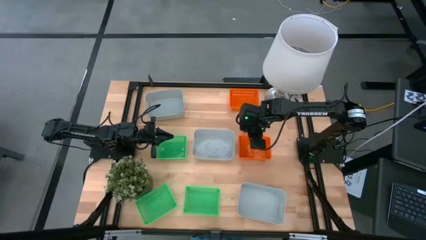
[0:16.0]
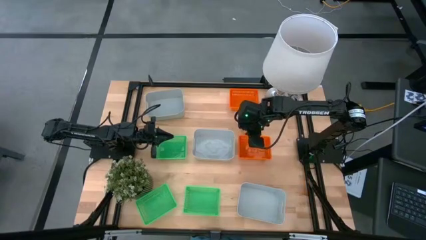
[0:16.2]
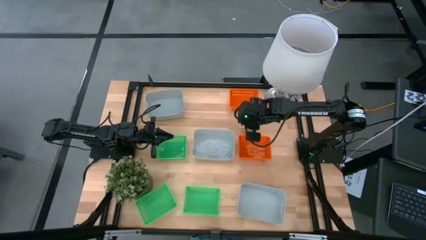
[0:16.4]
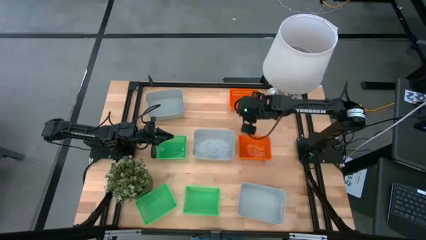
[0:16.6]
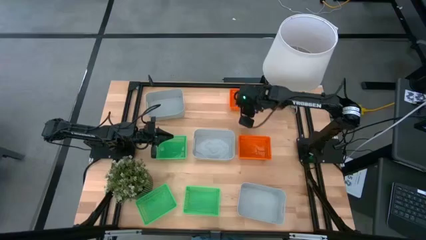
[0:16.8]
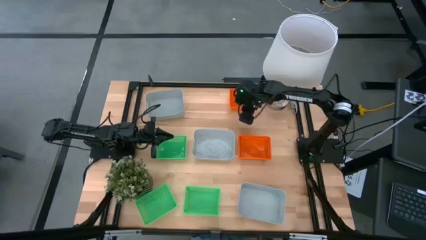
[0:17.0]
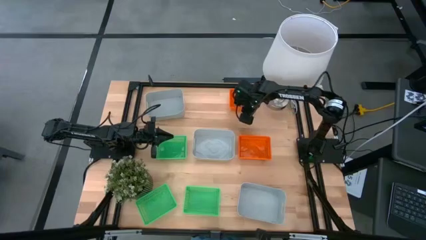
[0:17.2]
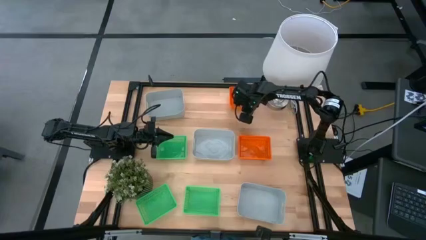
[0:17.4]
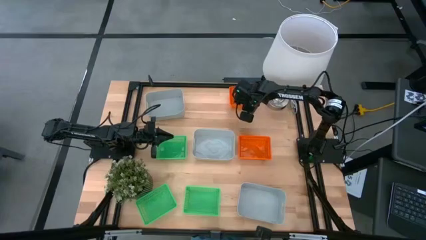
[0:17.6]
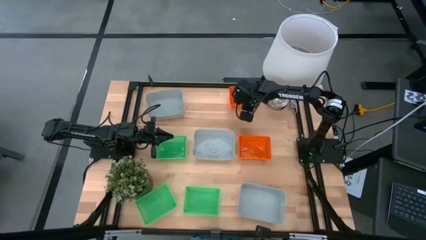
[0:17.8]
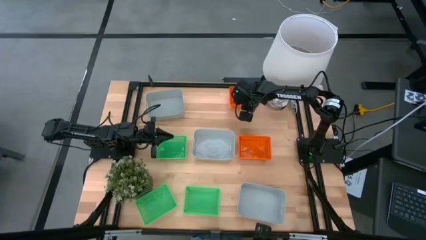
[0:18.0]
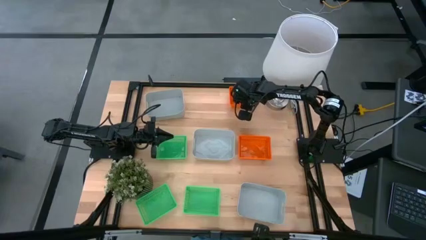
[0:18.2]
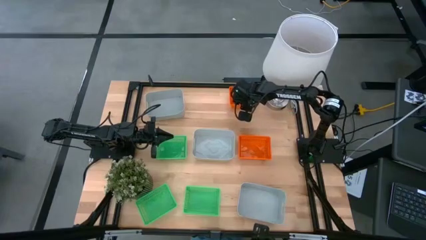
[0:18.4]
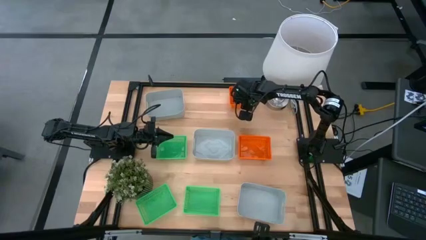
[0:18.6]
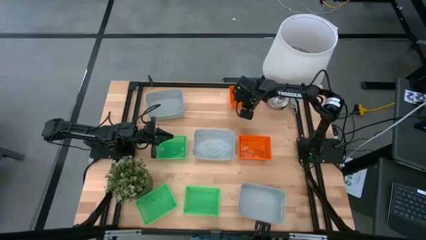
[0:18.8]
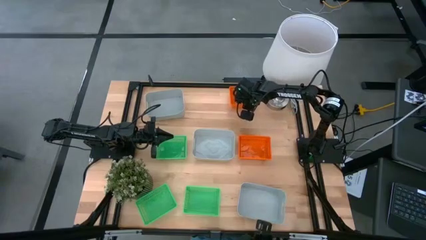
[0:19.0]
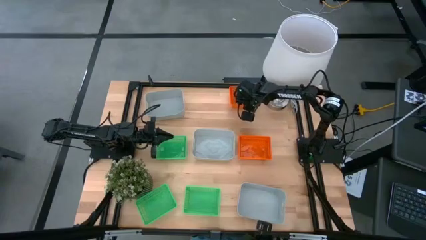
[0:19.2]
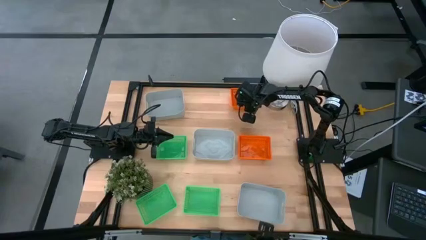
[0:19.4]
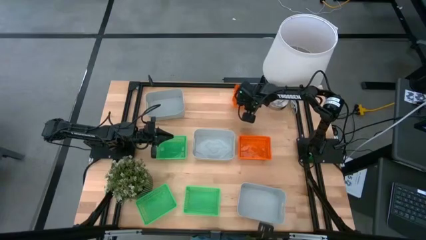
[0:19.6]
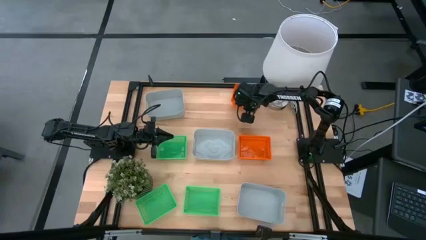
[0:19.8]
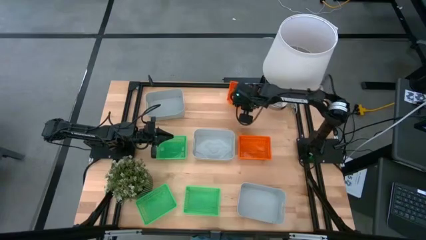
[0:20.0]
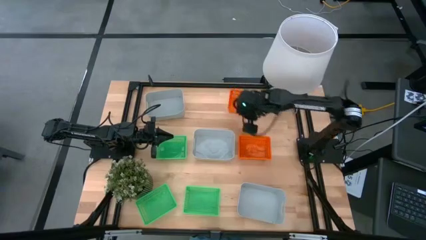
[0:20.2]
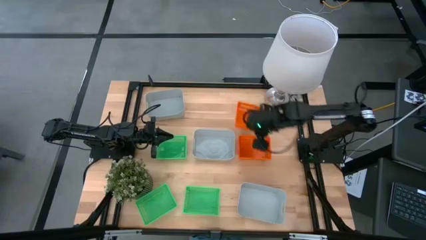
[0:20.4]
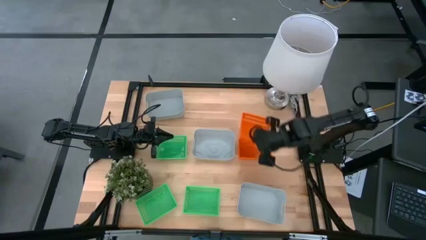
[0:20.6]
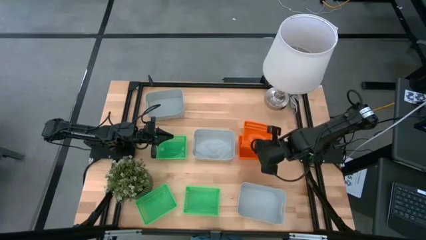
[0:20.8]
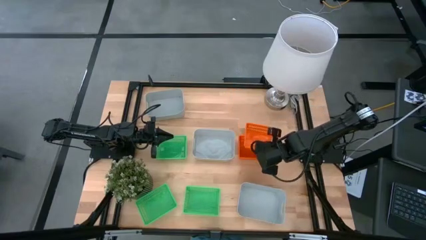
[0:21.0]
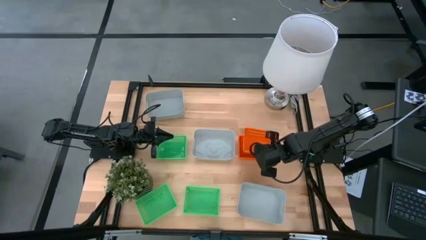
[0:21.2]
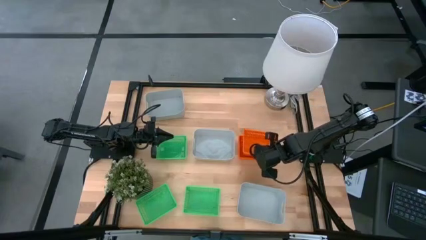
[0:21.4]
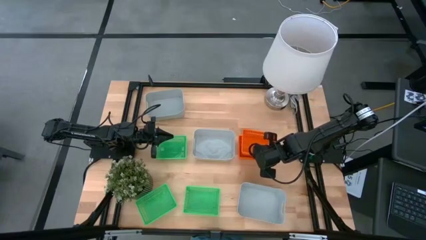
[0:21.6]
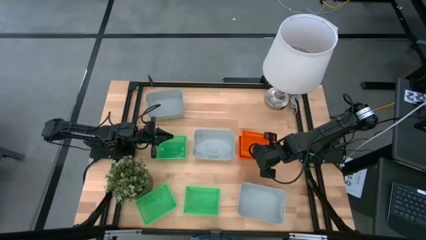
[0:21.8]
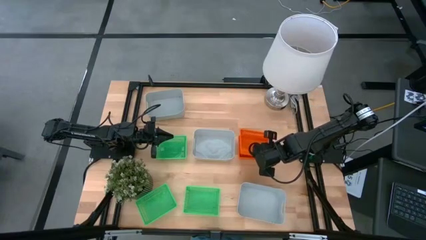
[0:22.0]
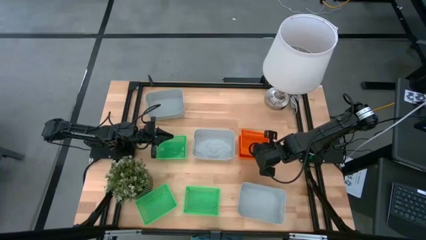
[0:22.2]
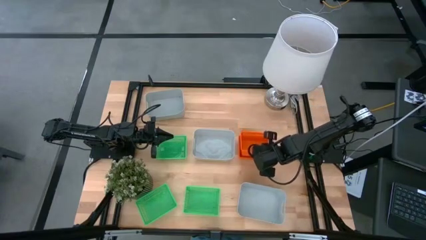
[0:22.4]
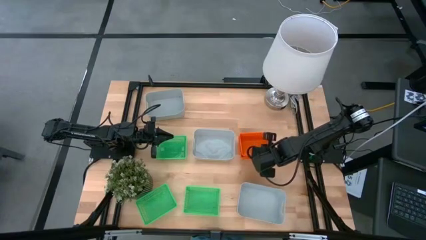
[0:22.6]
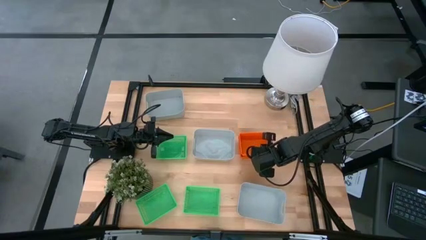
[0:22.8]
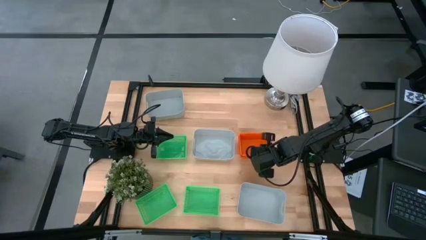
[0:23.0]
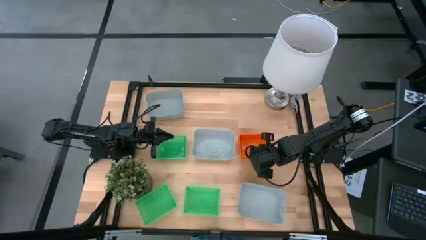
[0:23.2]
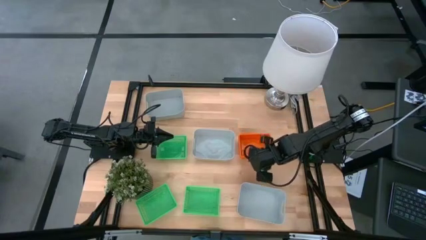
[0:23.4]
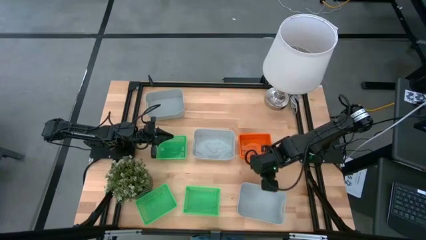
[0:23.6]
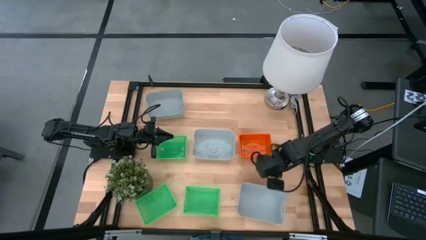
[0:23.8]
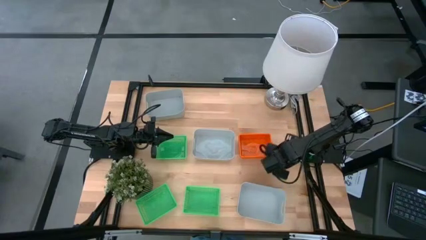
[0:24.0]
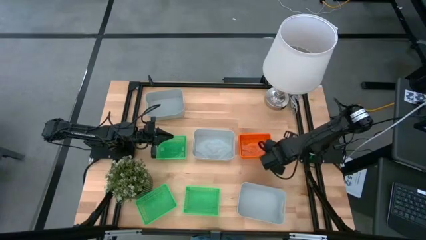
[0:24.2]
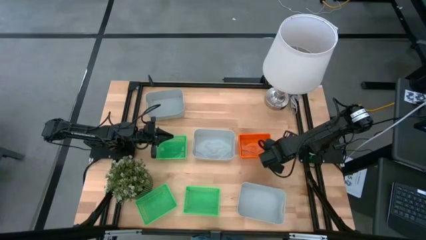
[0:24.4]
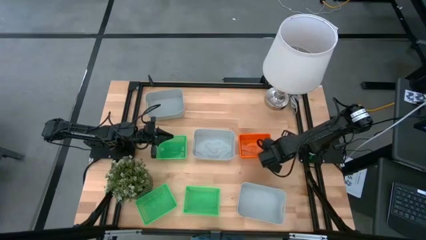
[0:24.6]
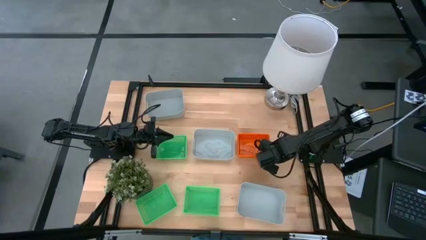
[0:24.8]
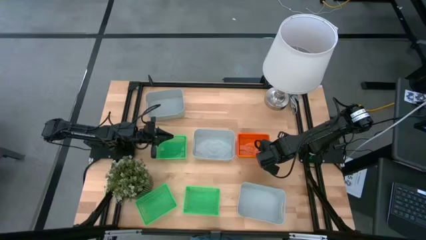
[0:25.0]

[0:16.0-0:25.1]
Stack the top orange bin on top of the bottom orange bin

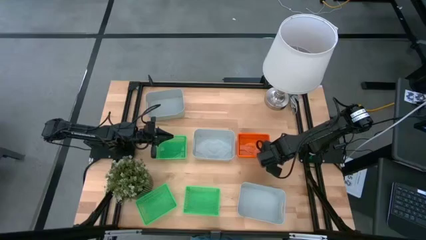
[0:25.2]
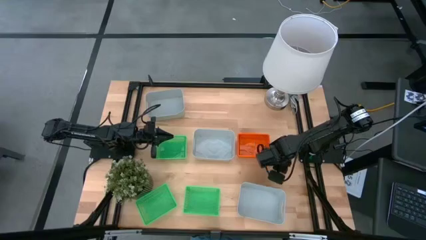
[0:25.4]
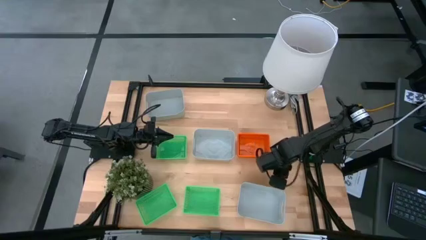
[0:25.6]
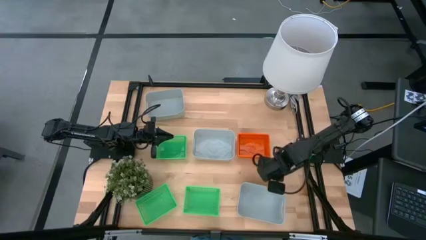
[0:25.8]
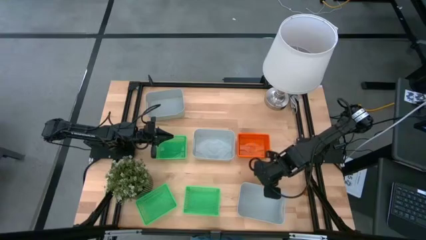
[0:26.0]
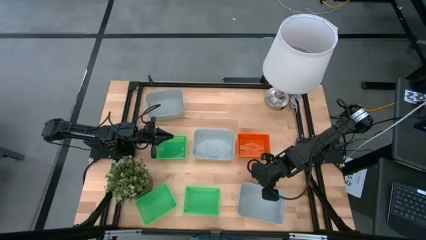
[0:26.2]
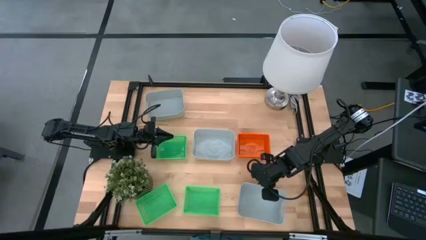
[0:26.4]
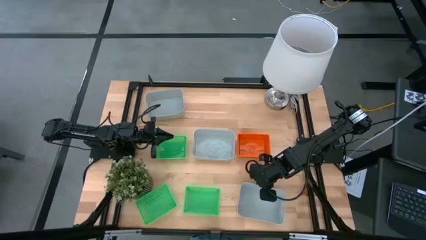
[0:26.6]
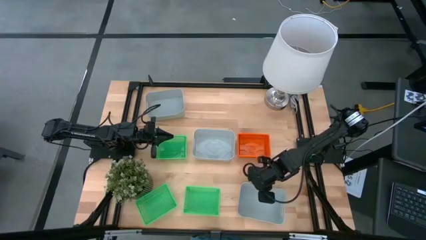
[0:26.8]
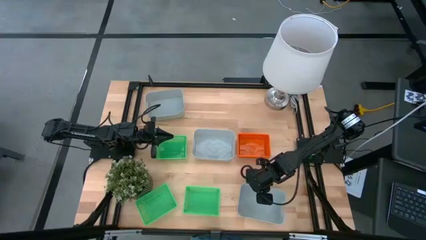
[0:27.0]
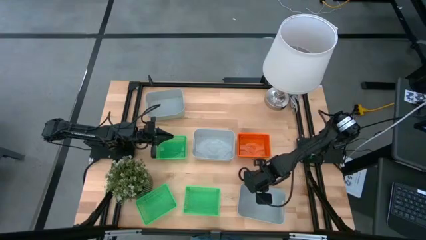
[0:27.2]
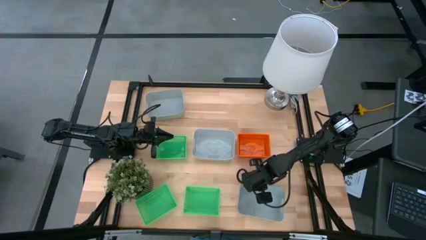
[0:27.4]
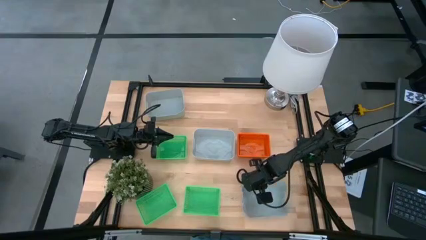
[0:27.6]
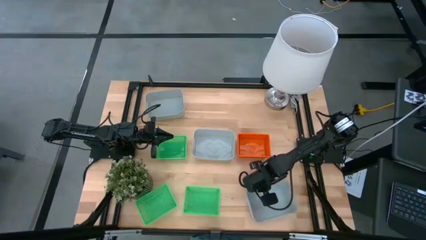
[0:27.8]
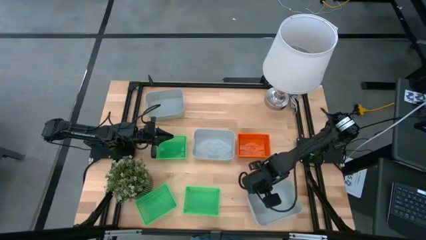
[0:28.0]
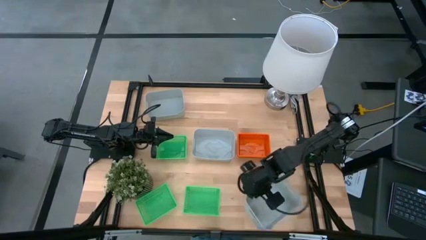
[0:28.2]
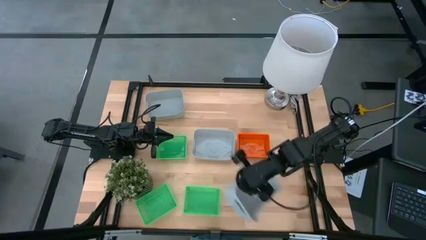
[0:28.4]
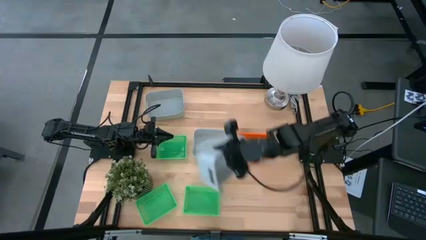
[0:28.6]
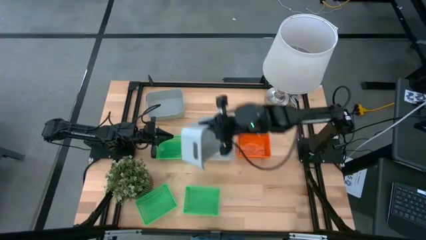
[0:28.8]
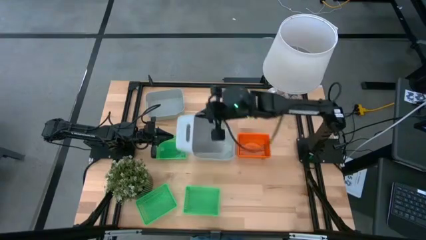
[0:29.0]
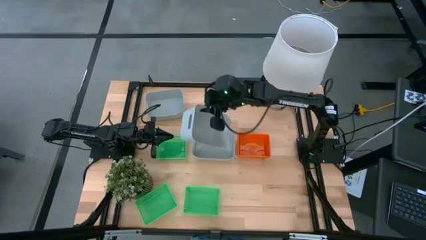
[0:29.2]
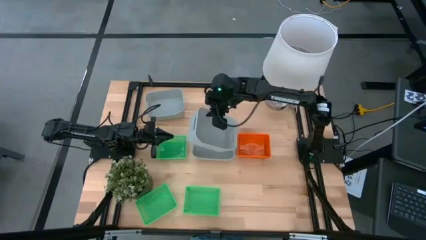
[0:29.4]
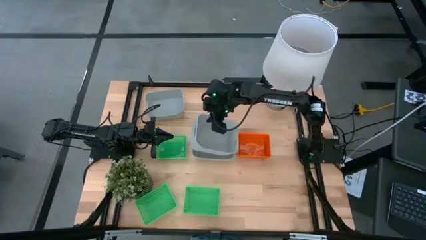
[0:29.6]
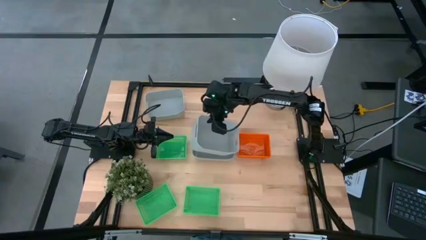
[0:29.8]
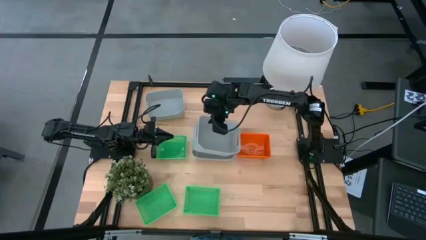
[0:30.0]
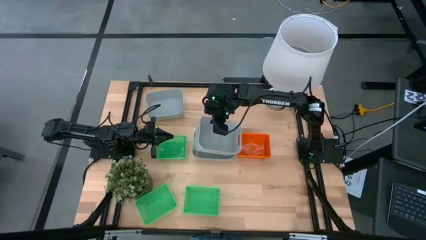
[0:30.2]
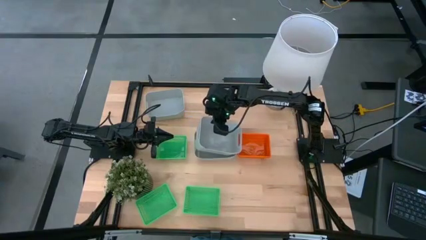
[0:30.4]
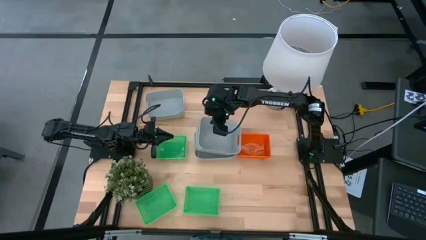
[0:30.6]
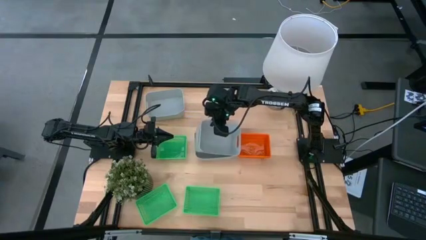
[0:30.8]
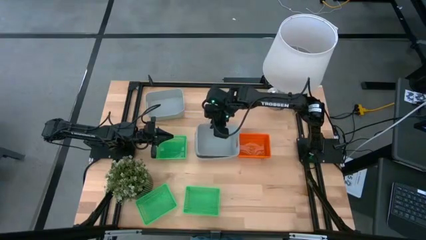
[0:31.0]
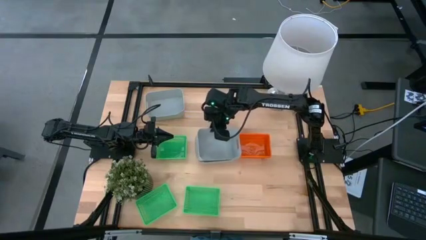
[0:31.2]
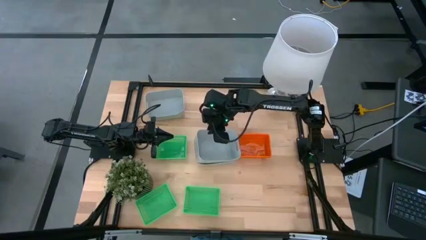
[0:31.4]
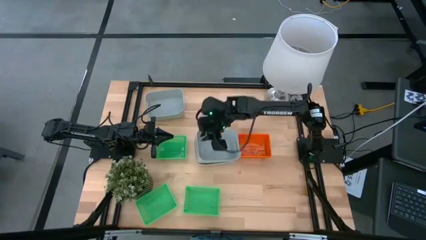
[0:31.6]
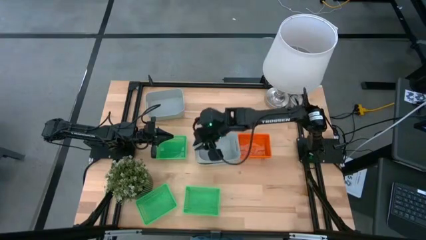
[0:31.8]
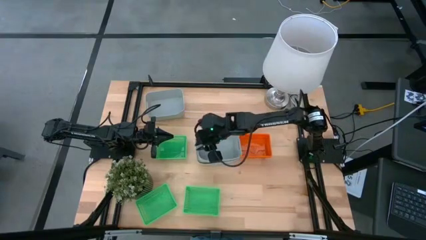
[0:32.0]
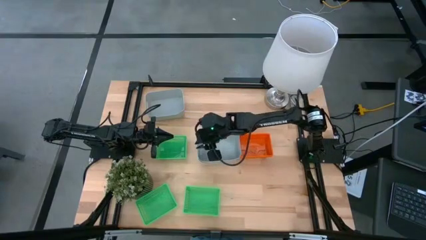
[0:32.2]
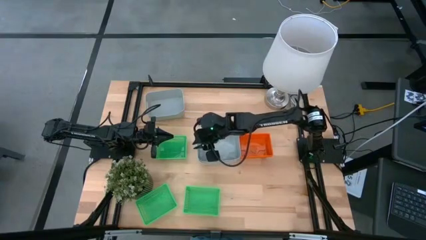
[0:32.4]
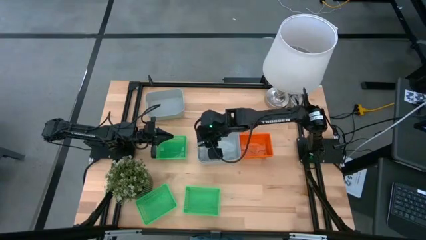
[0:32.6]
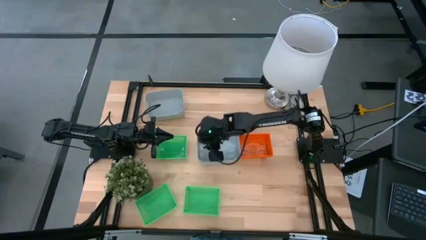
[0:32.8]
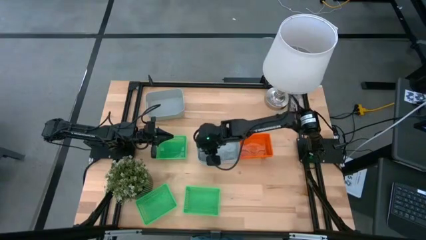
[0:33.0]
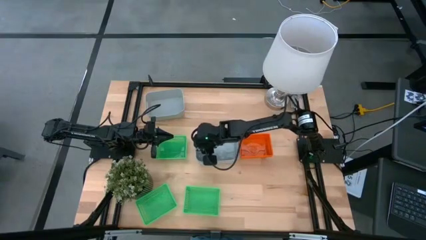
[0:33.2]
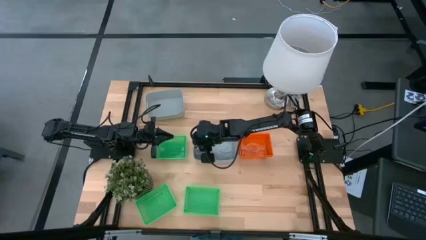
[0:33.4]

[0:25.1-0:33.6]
Stack the bottom gray bin on top of the middle gray bin
